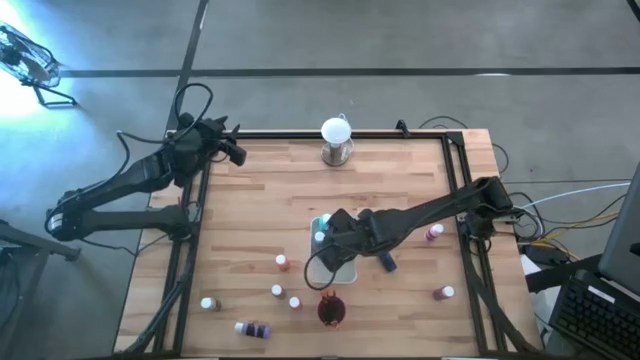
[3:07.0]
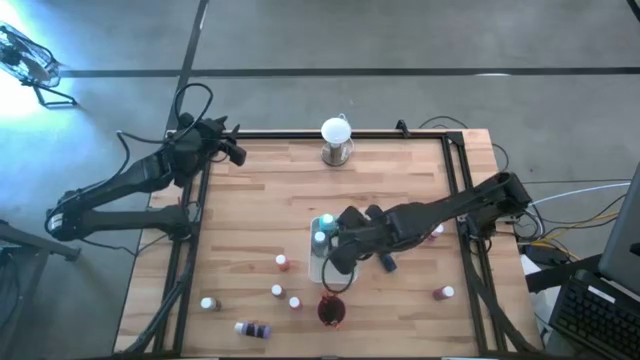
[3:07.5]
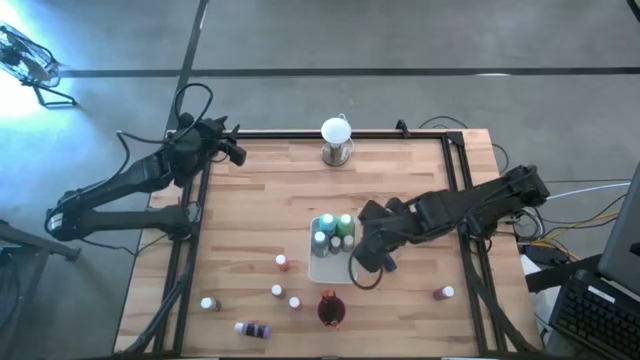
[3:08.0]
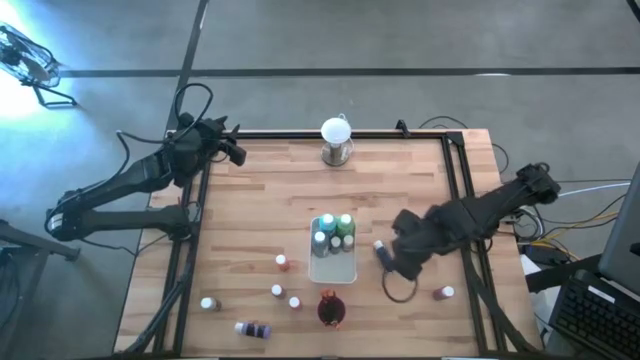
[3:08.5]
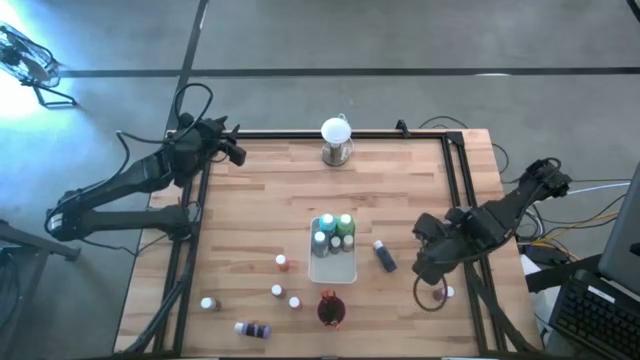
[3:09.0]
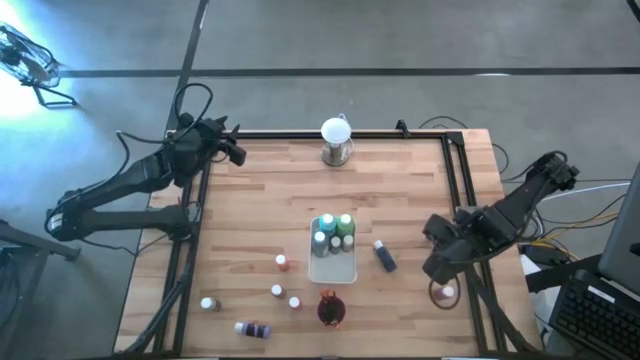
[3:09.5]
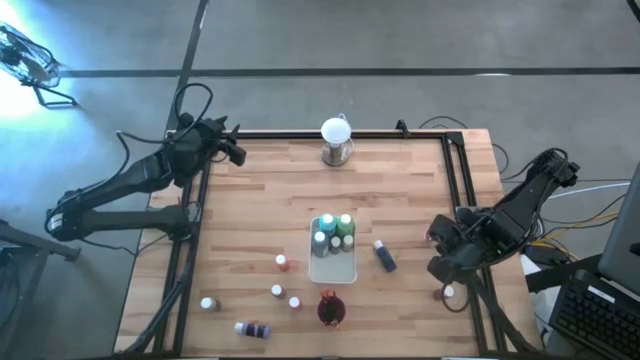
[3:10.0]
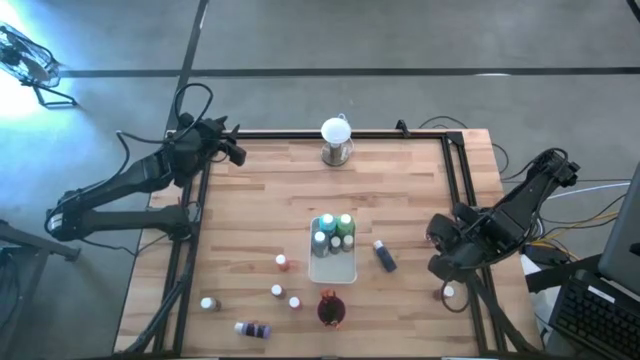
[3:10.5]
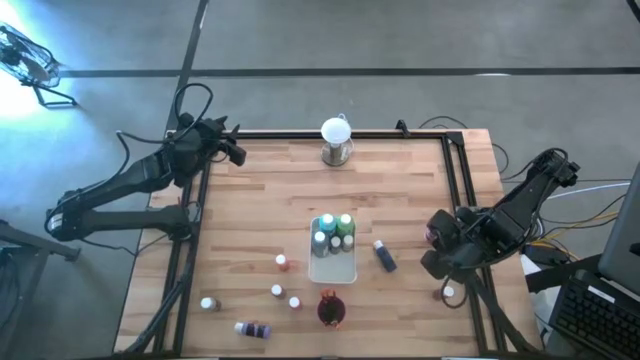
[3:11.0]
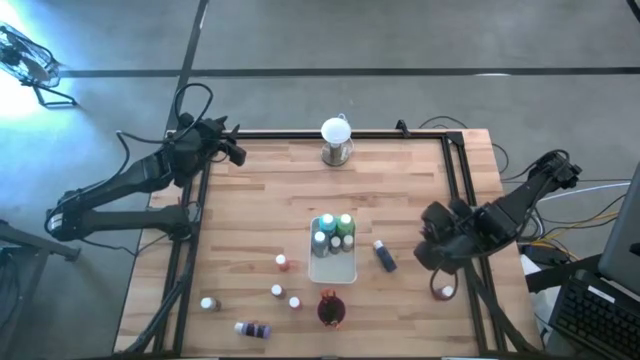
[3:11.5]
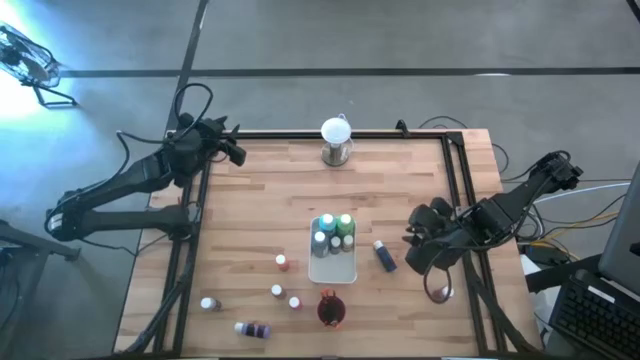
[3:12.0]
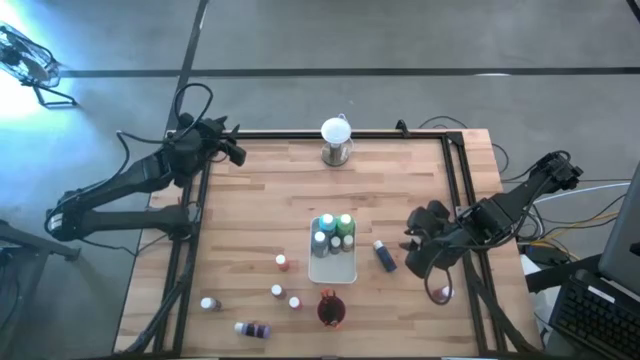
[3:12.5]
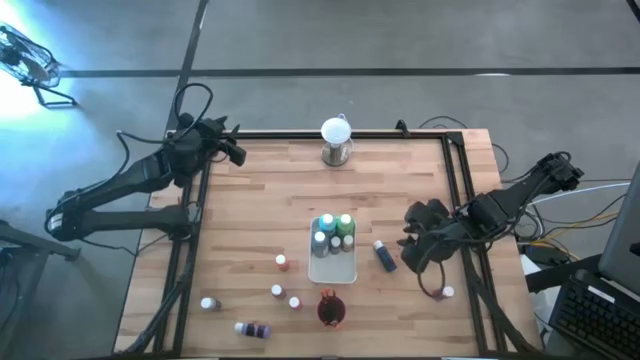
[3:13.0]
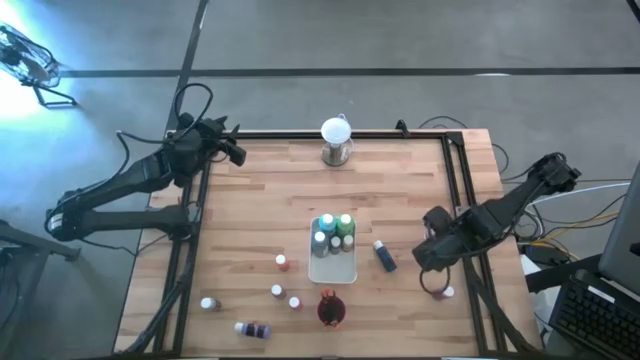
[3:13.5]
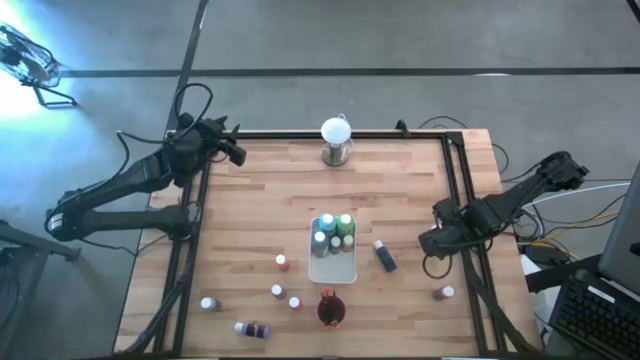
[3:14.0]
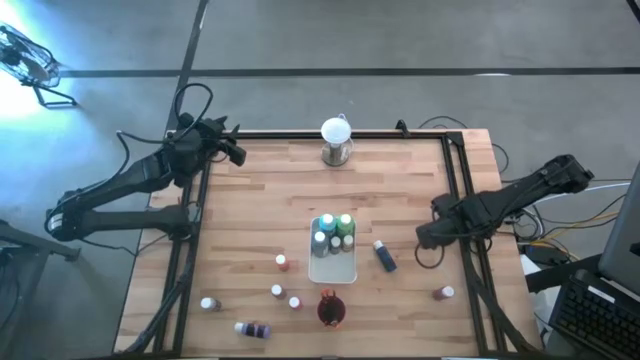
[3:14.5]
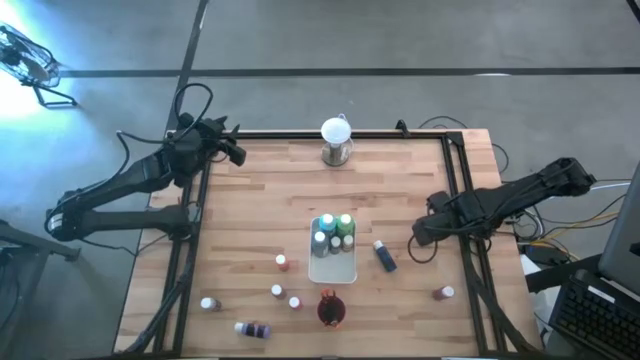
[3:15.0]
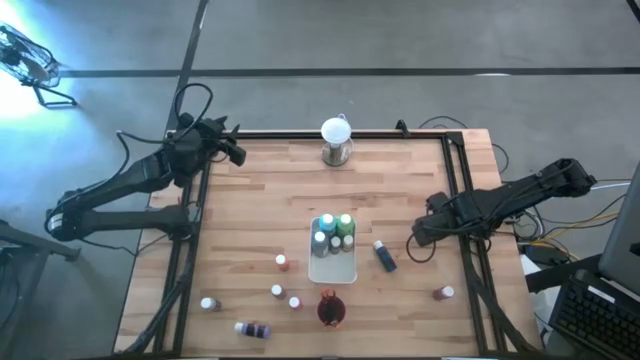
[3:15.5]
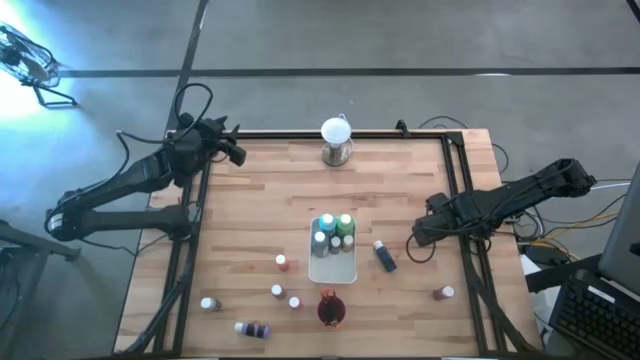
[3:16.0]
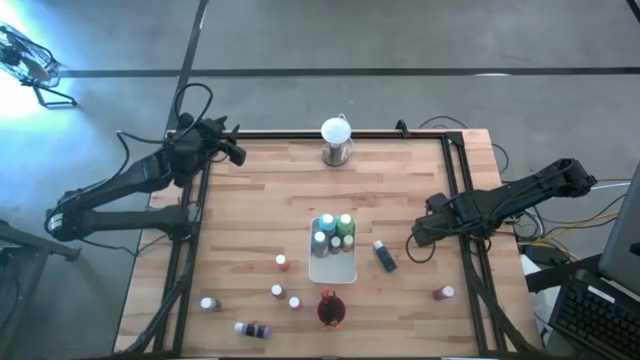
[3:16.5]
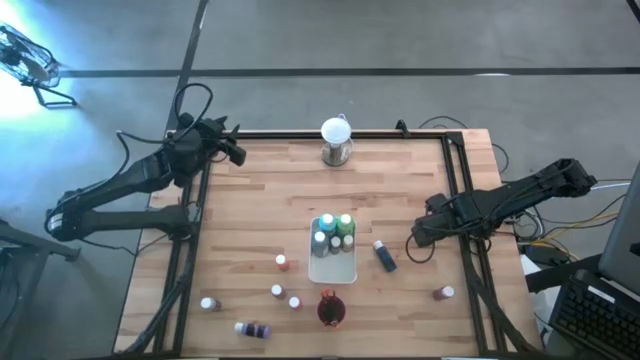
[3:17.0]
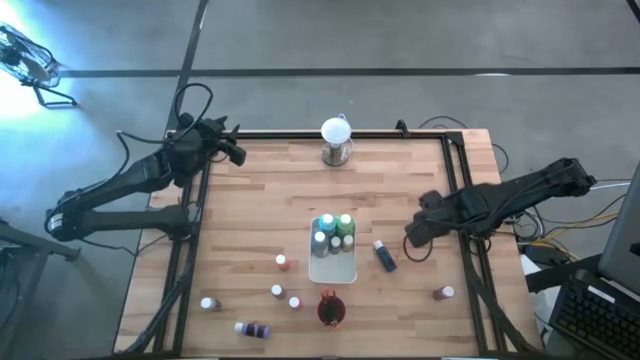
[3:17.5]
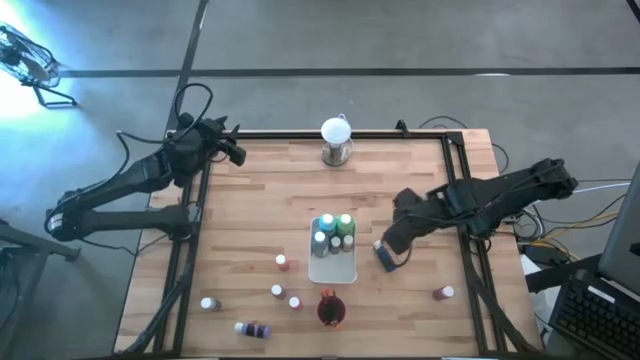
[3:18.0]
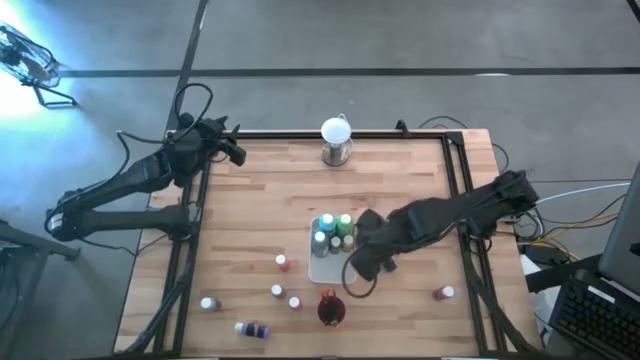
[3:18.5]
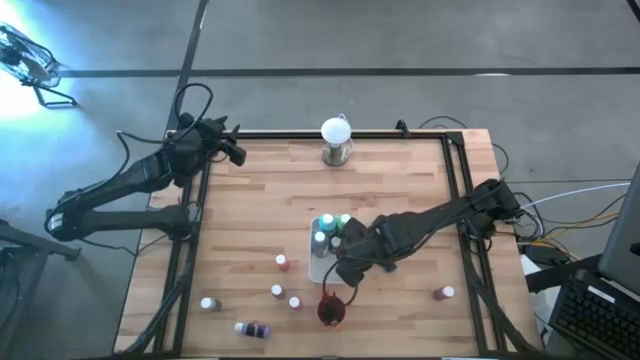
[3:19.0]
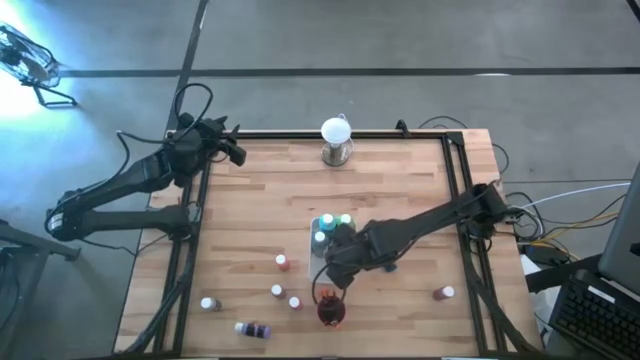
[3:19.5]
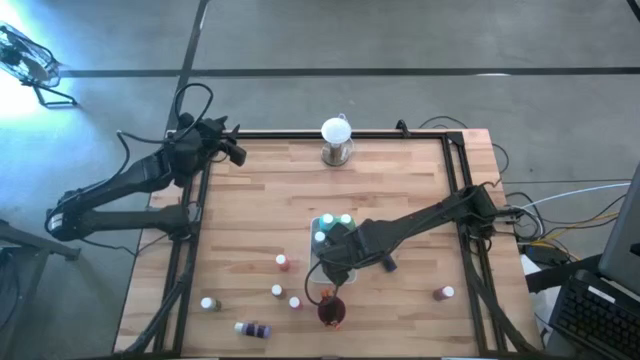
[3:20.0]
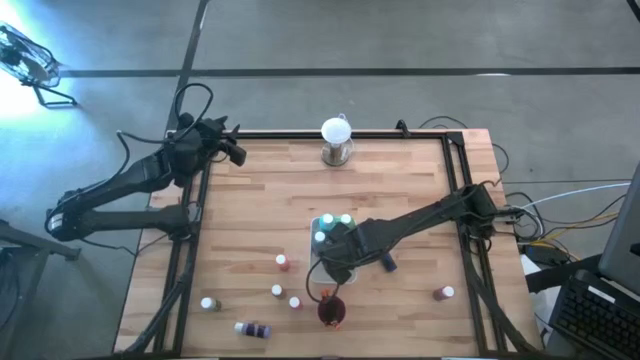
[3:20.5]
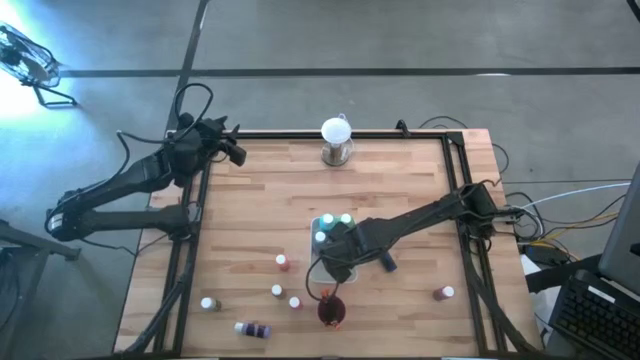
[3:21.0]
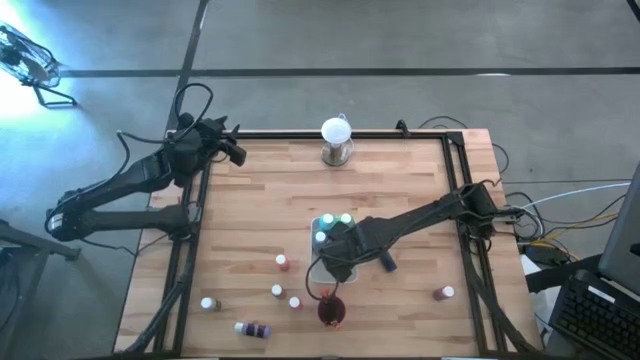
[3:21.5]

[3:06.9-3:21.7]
Task: Pick & Place Paint Supplies
Put the pink paint bottle into the white bin

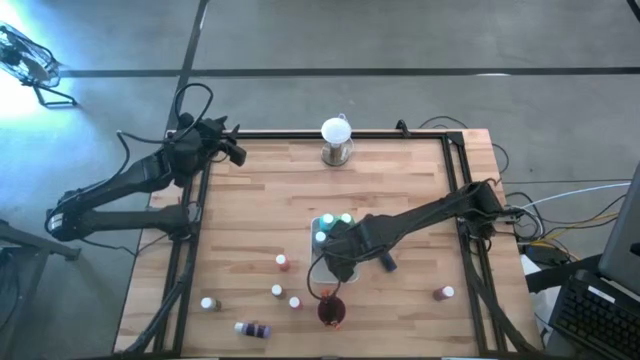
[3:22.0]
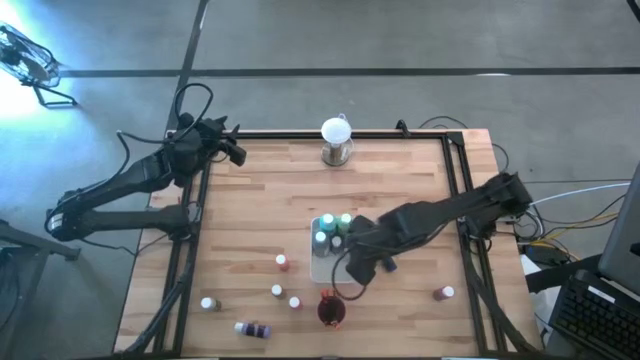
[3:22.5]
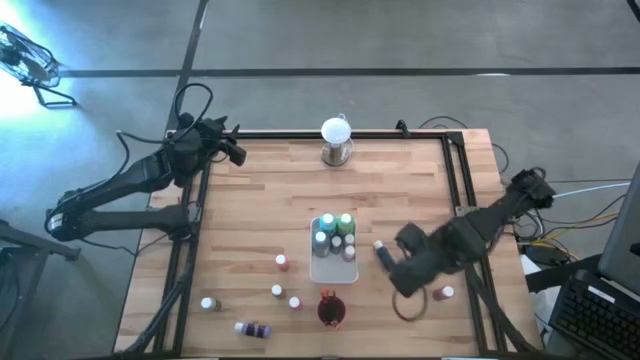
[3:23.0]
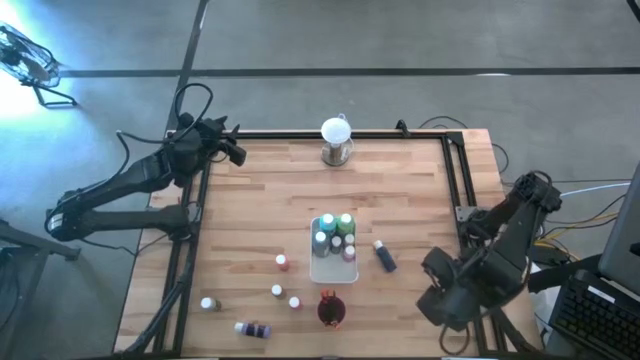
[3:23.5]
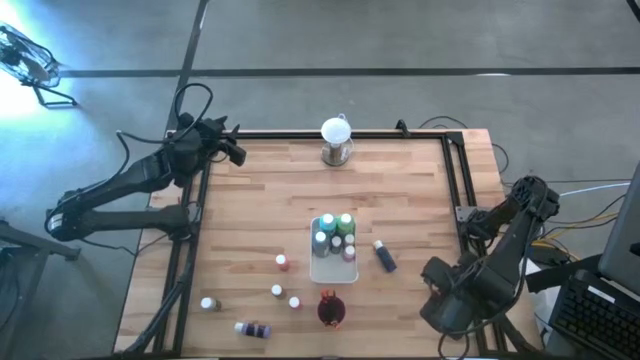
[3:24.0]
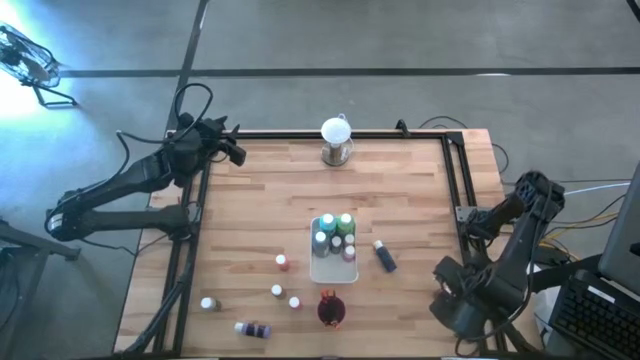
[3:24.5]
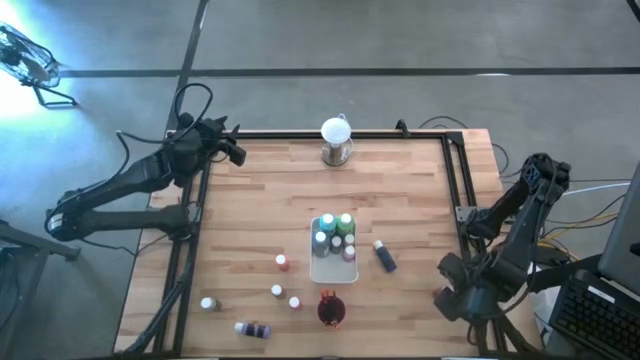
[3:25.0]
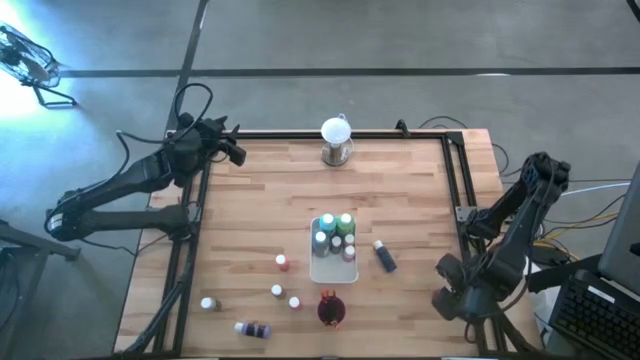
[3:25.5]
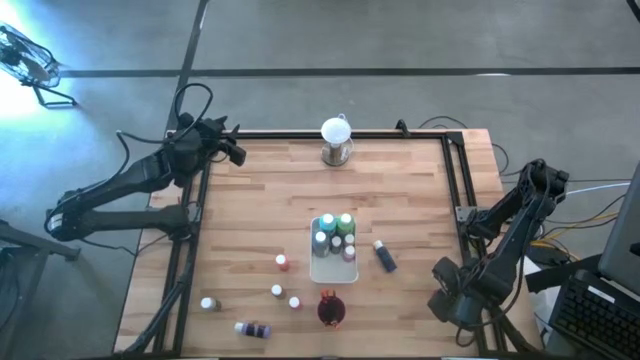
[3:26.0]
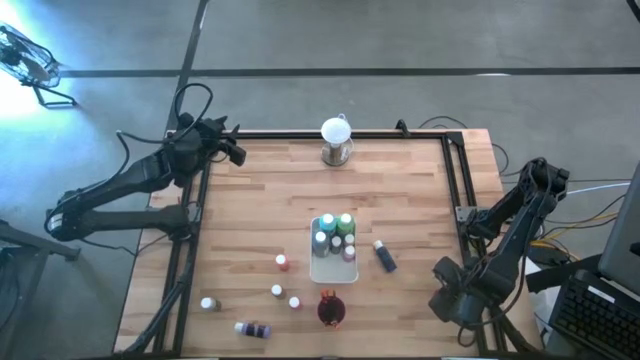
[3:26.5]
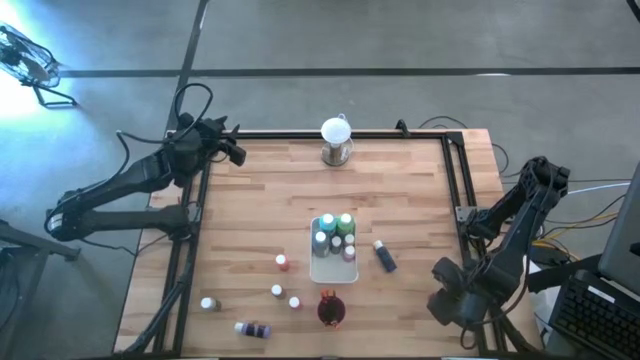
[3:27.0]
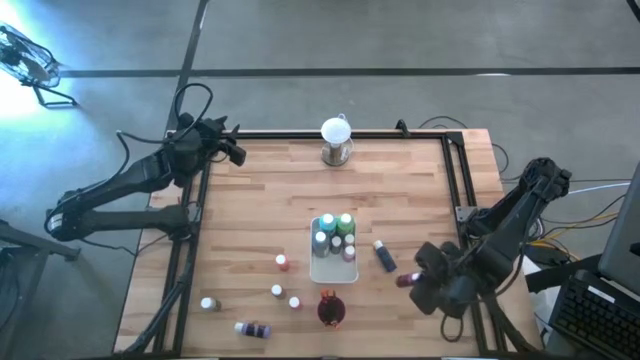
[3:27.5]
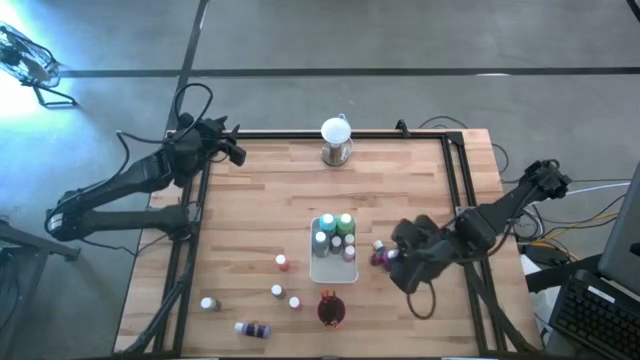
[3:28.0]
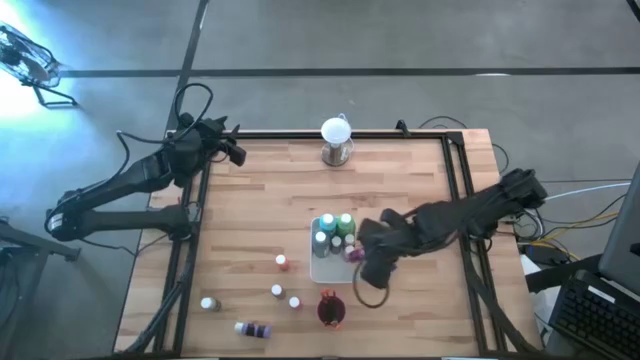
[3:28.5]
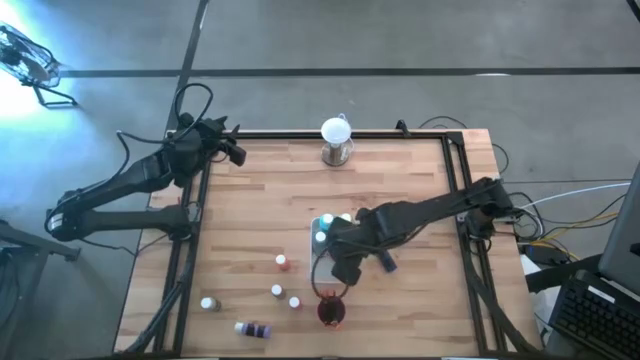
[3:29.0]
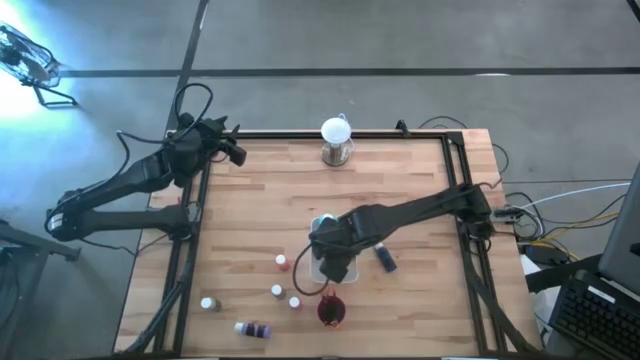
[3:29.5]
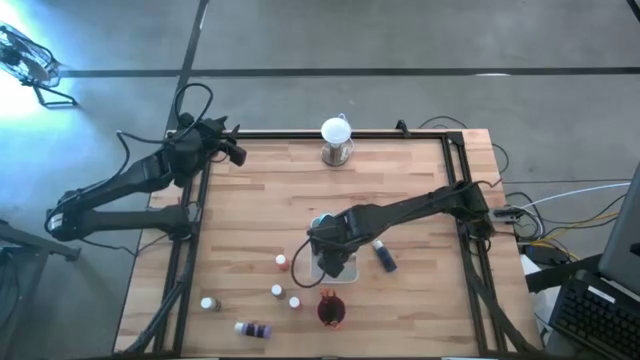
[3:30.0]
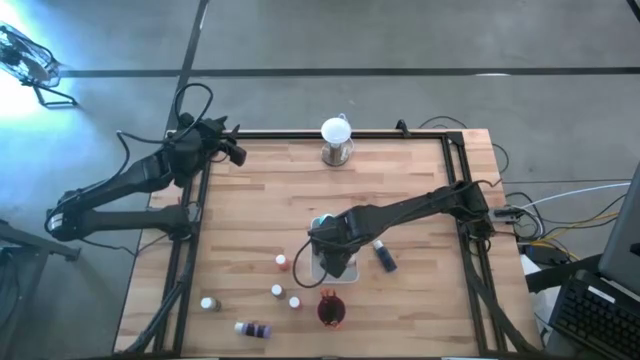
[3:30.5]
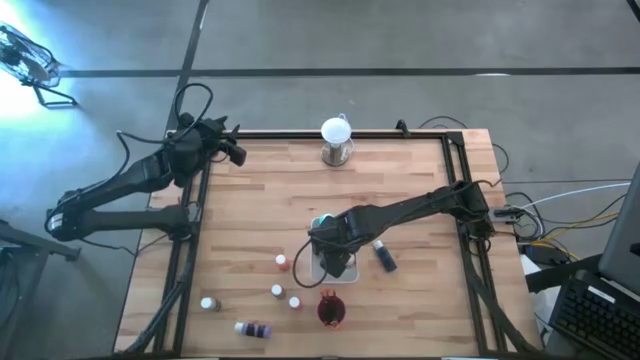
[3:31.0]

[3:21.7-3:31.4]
Put the dark pink paint bottle into the white bin
